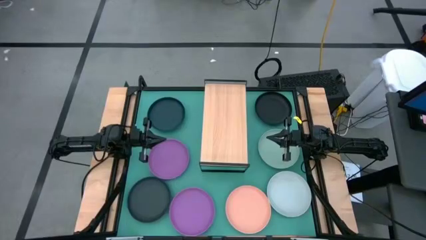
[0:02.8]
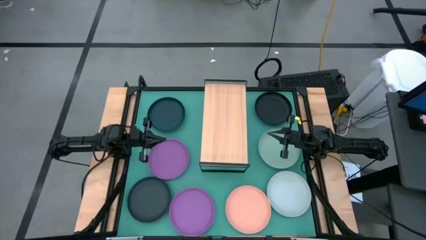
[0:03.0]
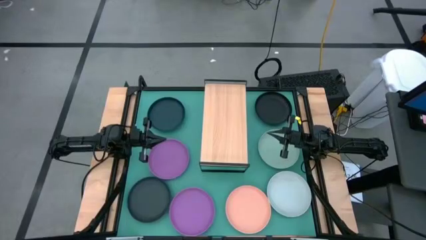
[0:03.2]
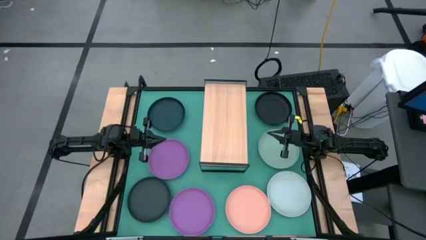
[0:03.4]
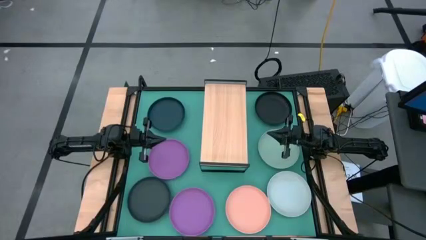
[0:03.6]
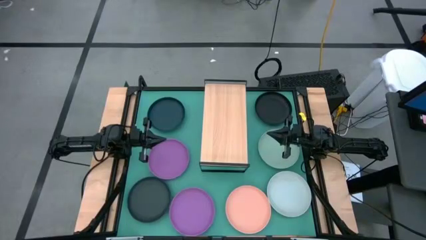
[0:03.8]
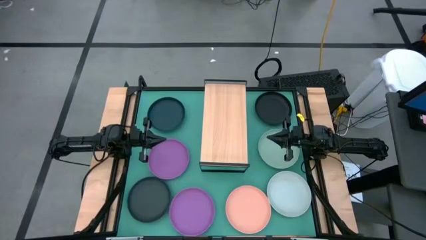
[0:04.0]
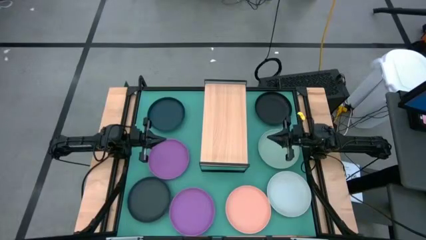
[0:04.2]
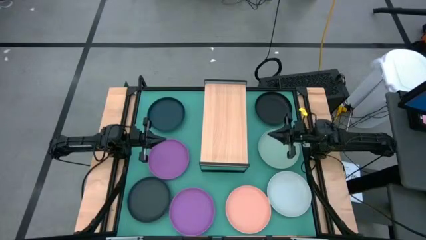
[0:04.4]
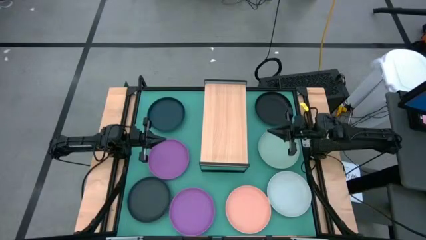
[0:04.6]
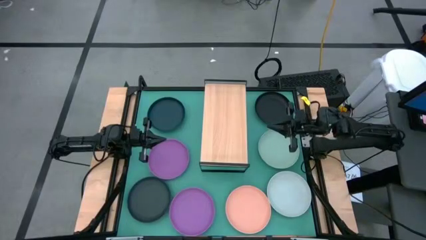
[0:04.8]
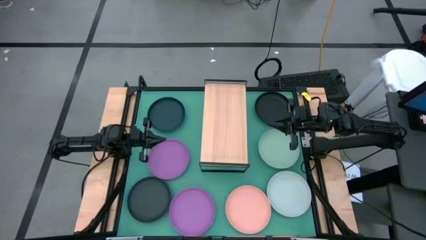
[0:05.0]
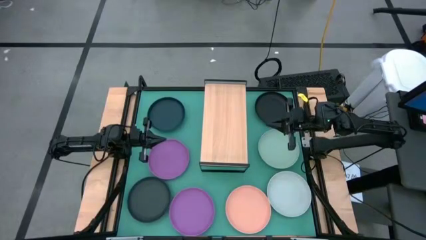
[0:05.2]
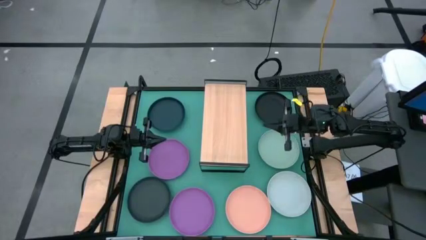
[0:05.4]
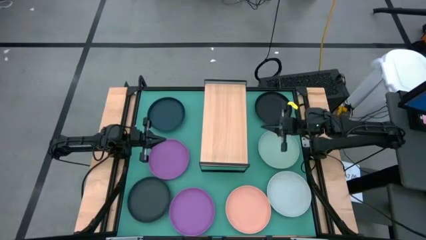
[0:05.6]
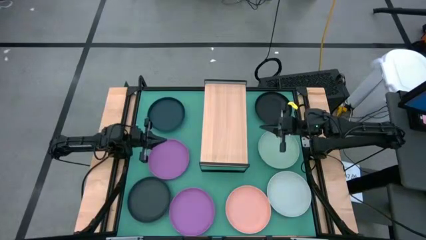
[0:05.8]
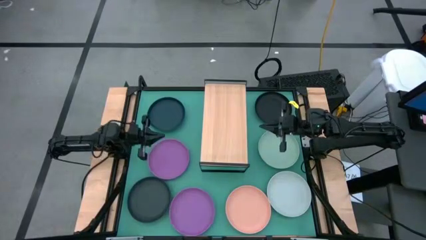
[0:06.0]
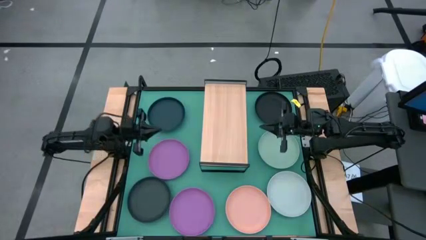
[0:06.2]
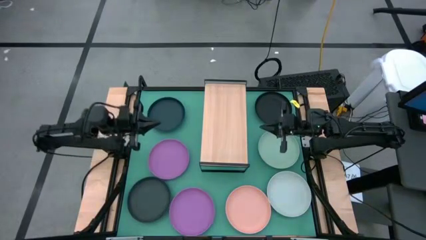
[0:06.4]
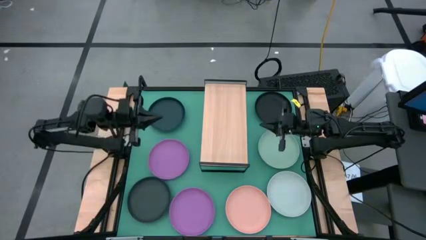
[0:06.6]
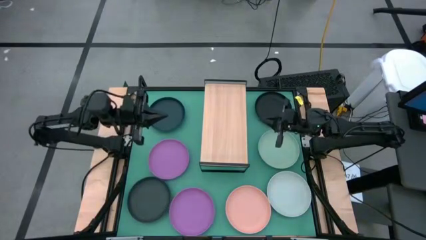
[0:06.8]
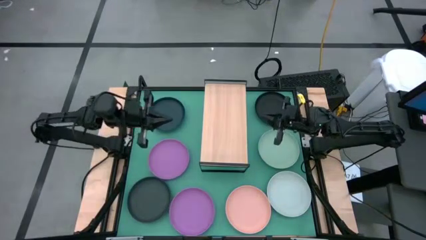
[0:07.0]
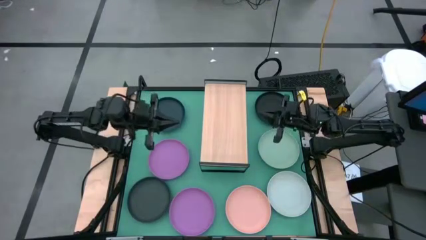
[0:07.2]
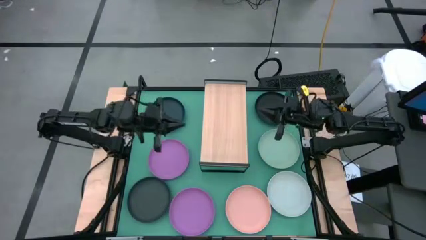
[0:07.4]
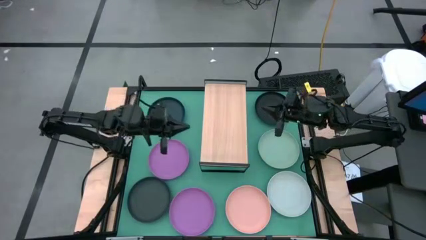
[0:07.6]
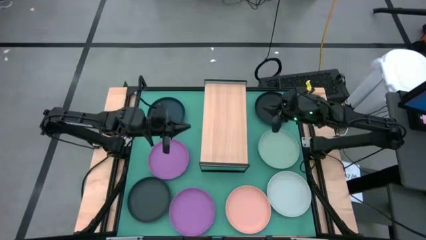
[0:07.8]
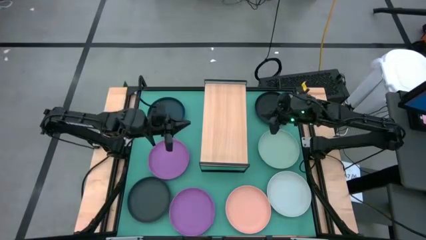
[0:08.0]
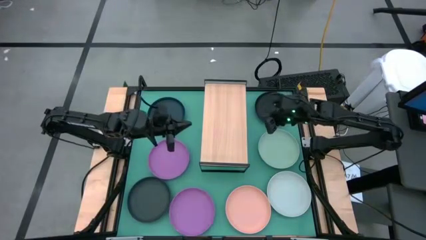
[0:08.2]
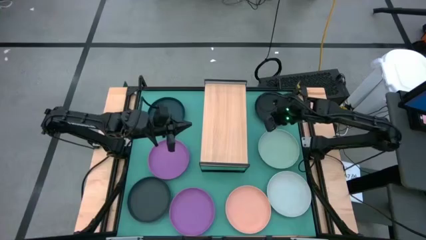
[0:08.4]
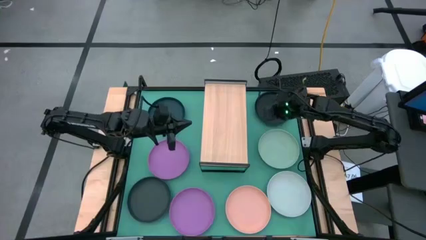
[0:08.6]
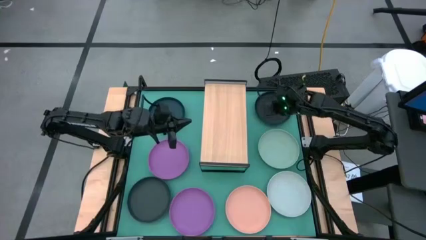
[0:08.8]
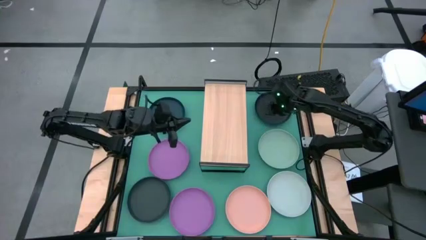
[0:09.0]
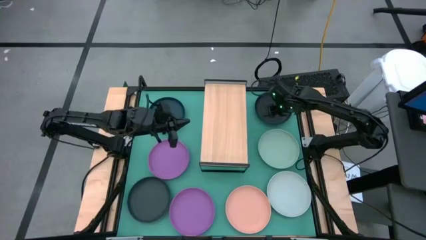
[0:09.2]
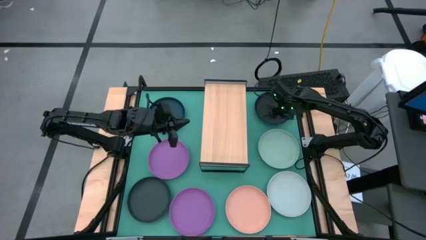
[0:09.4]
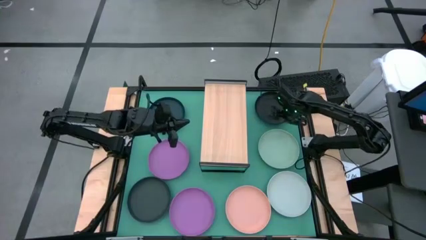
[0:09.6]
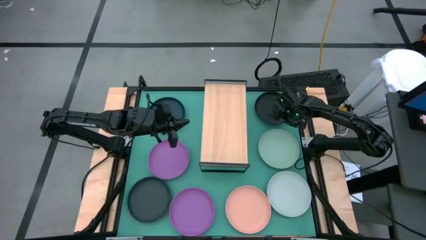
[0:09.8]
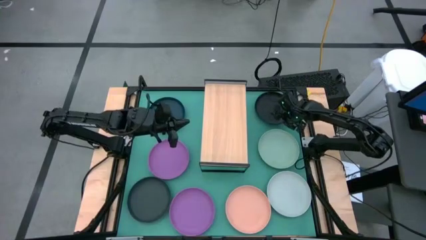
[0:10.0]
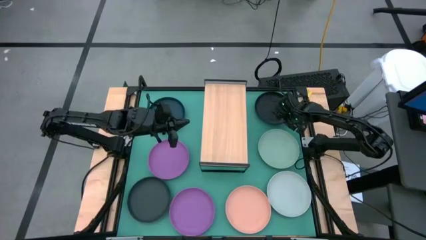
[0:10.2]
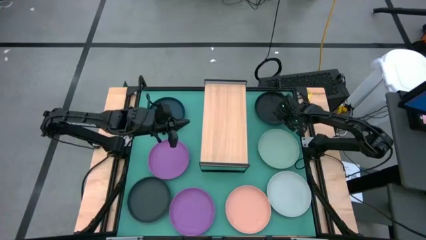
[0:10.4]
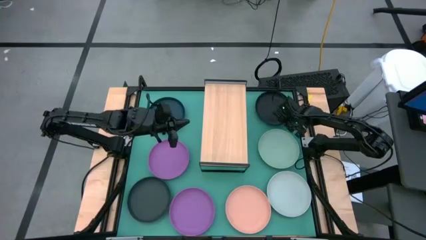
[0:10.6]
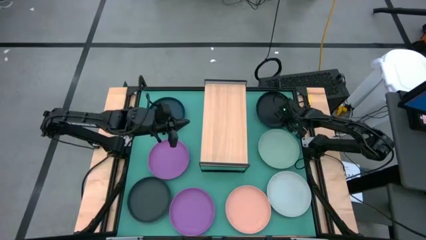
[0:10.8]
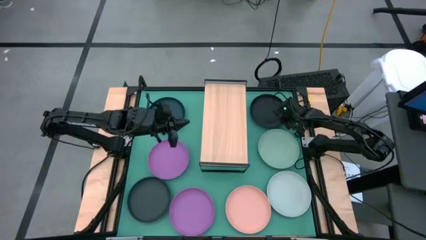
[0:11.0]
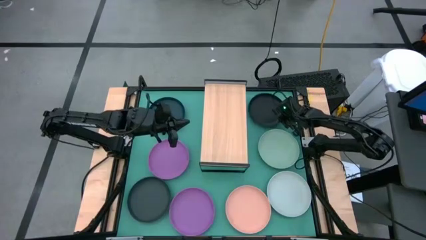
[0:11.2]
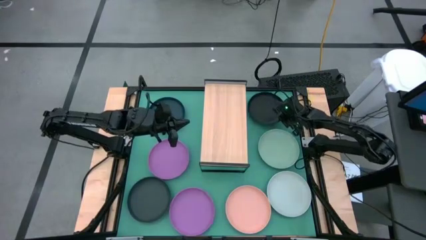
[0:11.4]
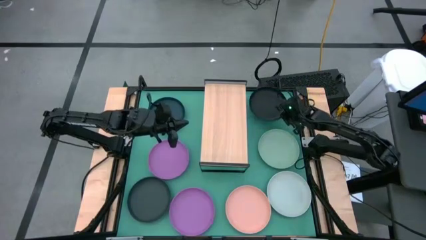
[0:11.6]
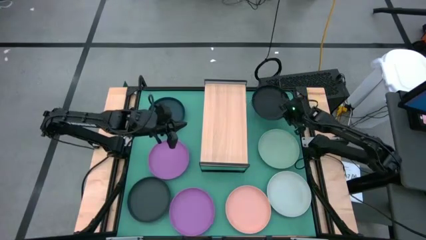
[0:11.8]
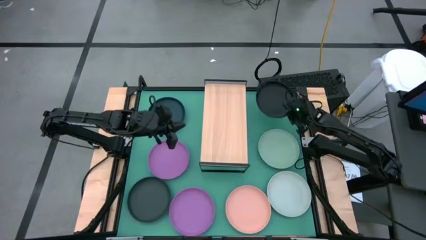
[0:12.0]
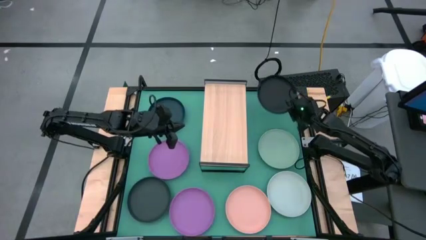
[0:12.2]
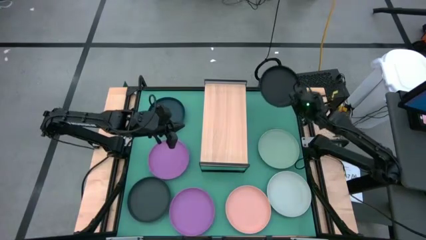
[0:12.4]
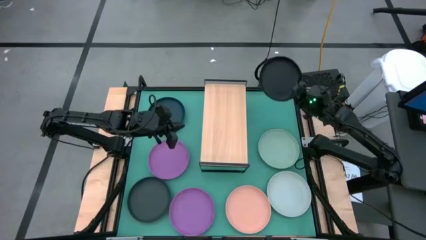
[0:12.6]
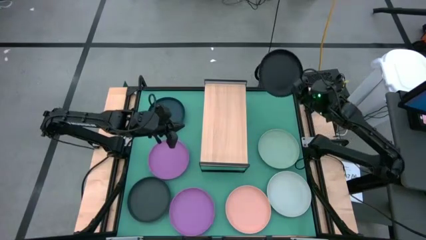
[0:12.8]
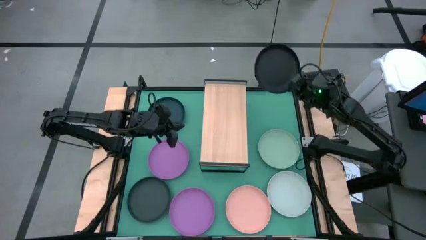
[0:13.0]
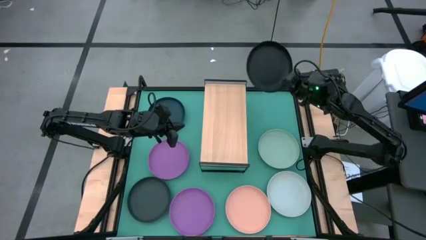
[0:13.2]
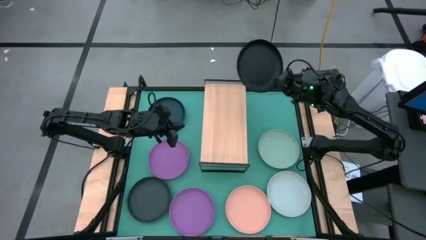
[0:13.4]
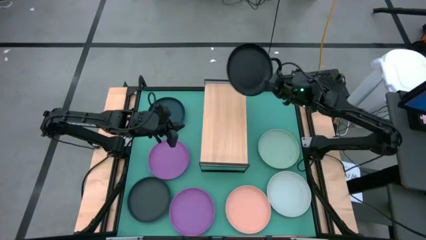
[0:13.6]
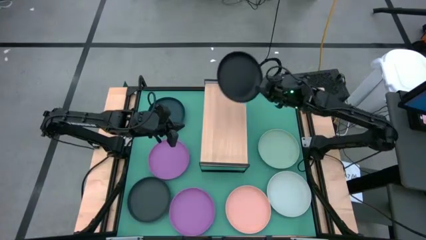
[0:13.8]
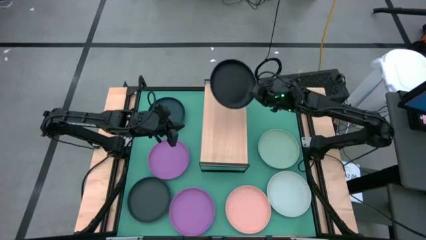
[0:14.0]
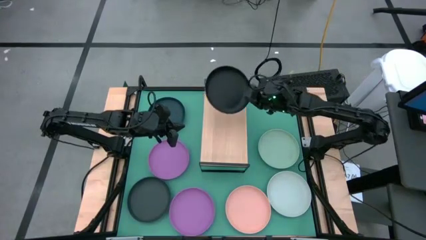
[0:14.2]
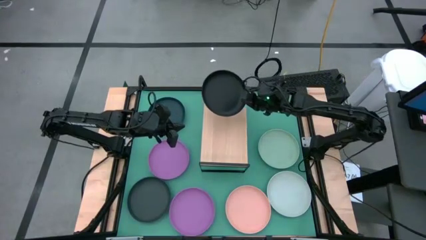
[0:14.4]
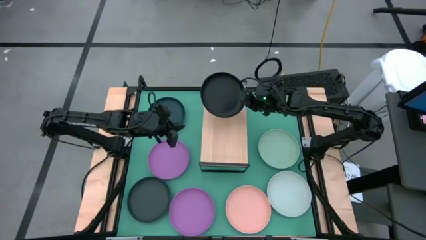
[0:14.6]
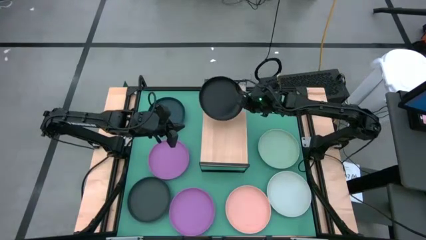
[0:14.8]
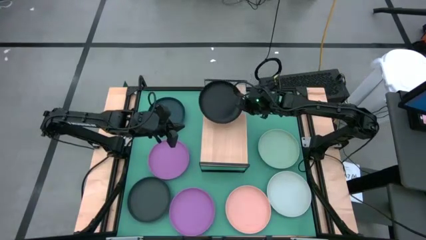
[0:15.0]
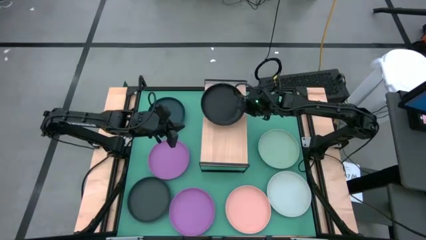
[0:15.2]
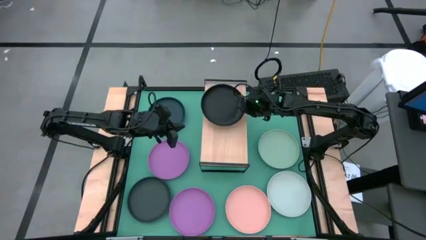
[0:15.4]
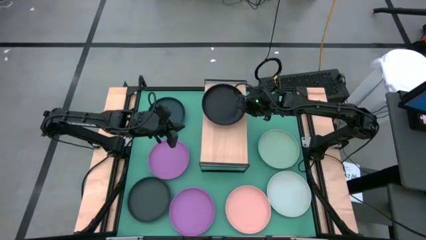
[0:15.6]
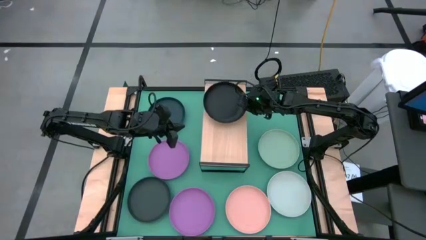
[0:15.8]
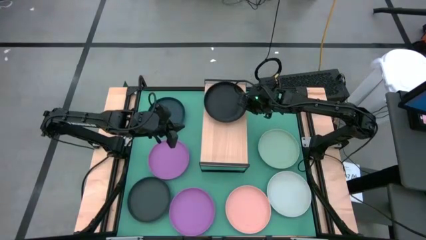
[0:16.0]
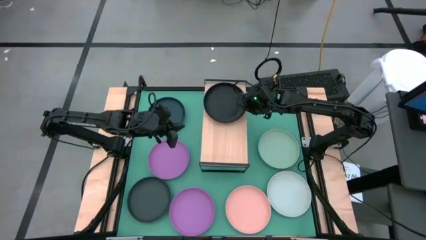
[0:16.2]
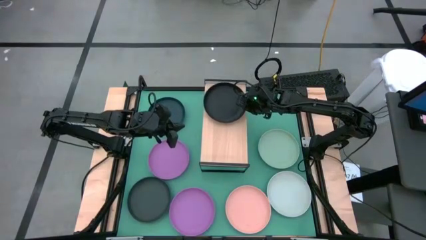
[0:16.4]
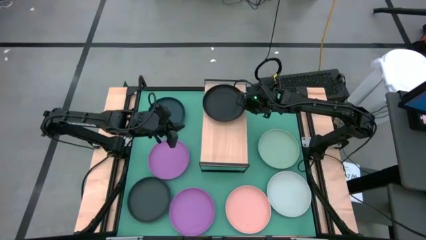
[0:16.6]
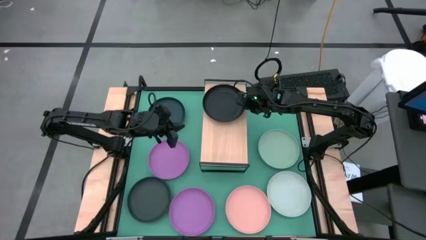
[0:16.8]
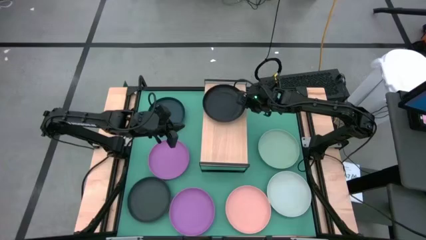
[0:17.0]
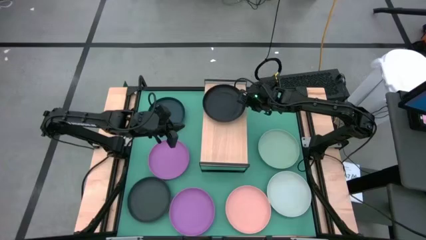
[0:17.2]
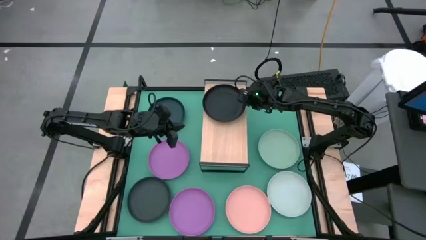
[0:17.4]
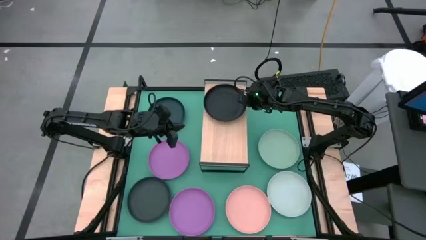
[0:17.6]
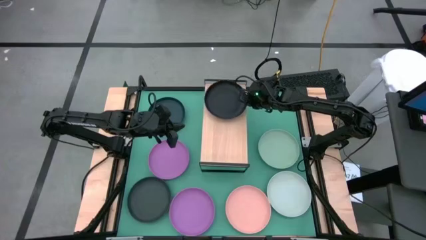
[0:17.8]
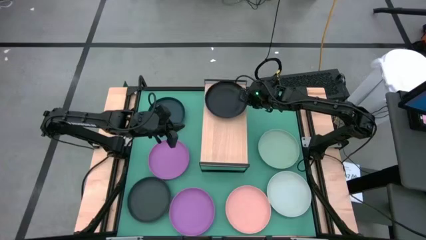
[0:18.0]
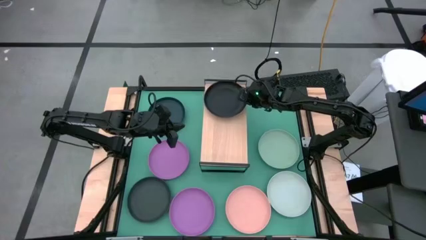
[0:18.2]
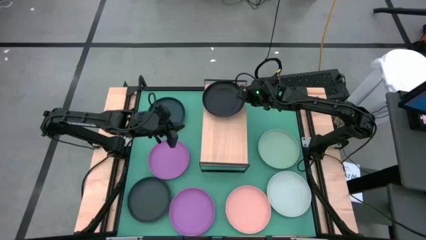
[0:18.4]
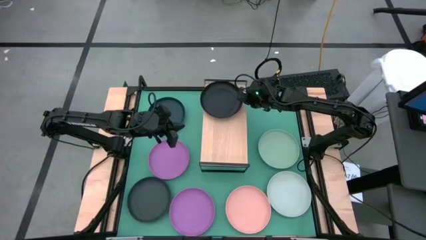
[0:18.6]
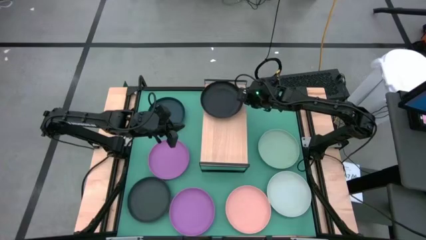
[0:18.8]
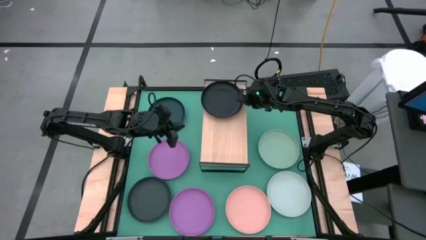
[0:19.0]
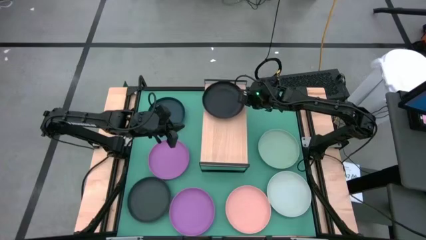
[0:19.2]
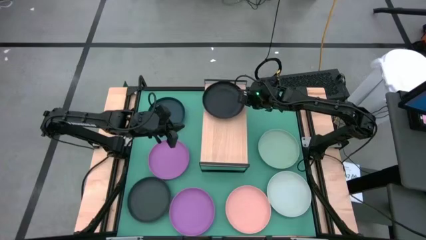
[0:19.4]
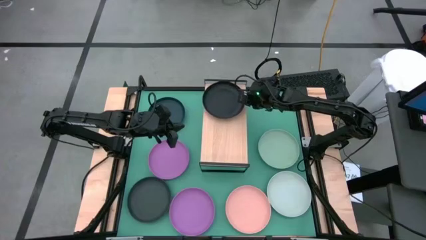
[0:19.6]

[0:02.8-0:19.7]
Task: Place and stack plates onto a shelf
Put the top right black plate on the shelf
